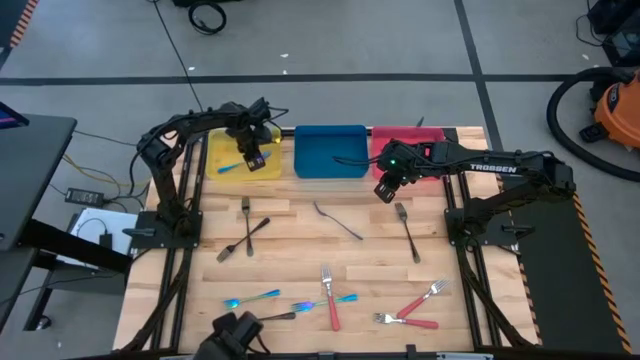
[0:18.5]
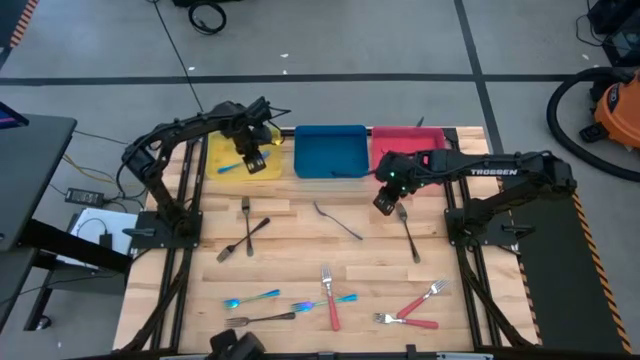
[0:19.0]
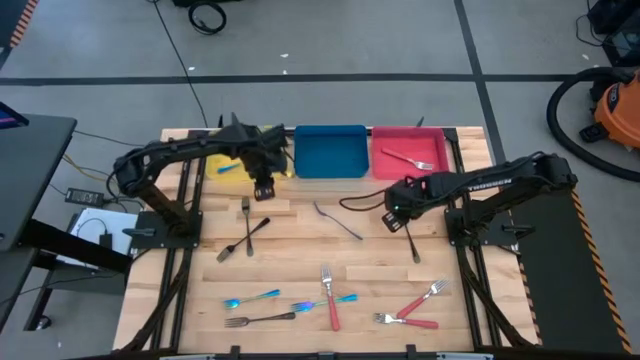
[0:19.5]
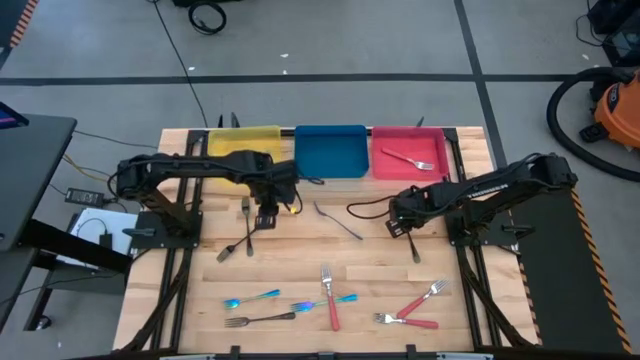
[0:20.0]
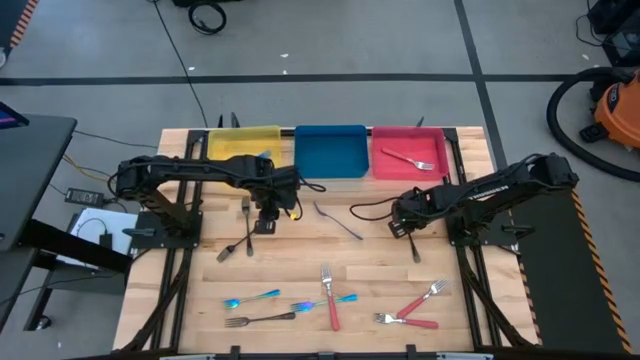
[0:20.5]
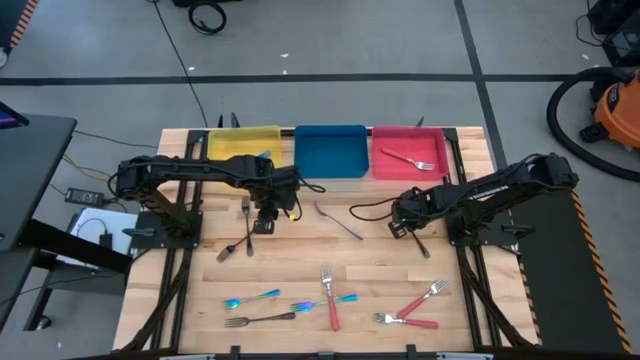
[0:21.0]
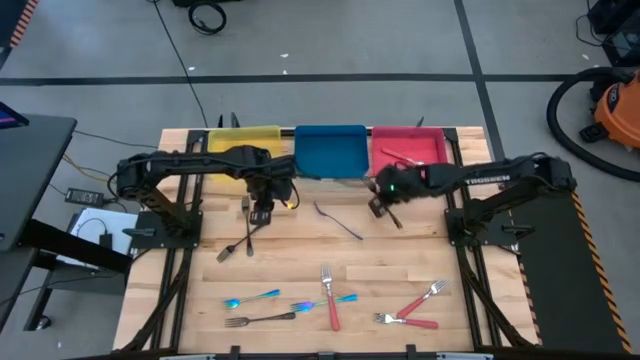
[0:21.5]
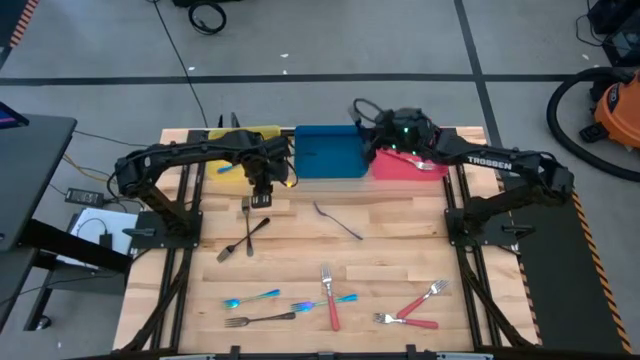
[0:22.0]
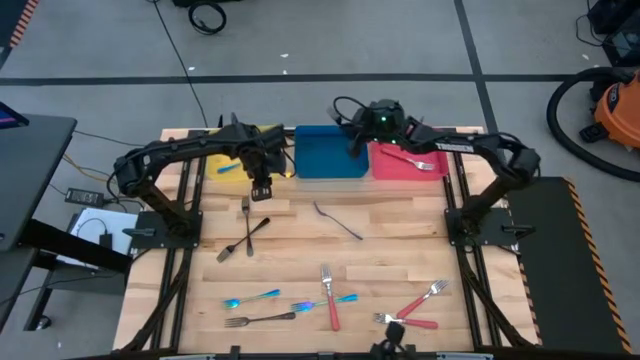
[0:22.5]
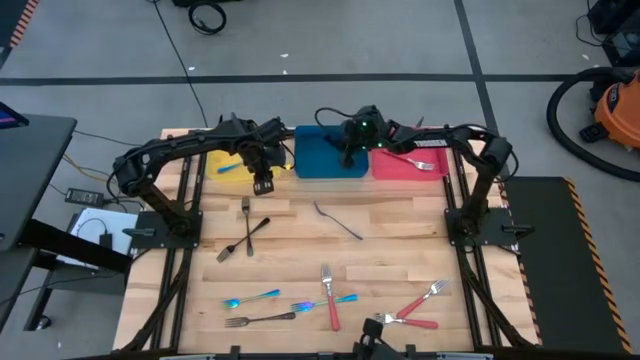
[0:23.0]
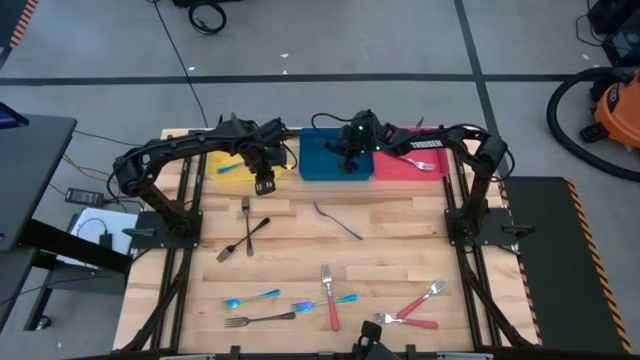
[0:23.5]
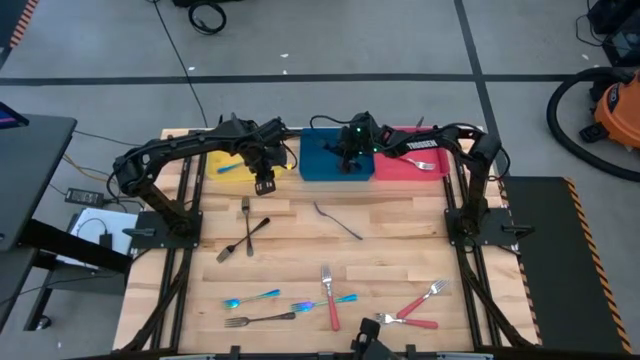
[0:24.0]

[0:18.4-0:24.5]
Task: Sort silverware by color (type)
Put the black fork into the blue bin

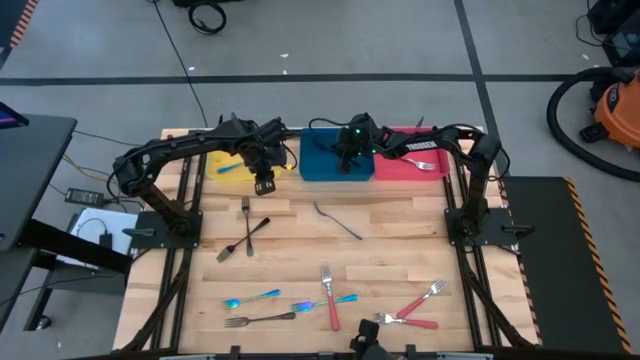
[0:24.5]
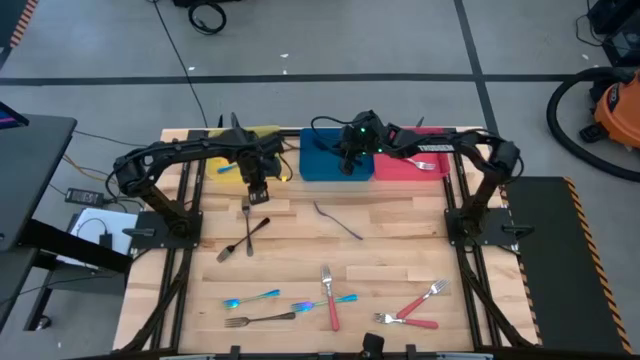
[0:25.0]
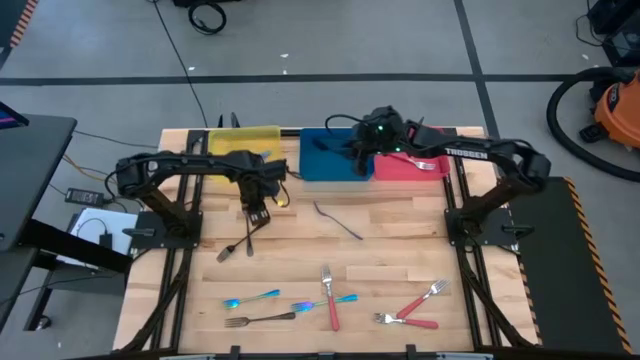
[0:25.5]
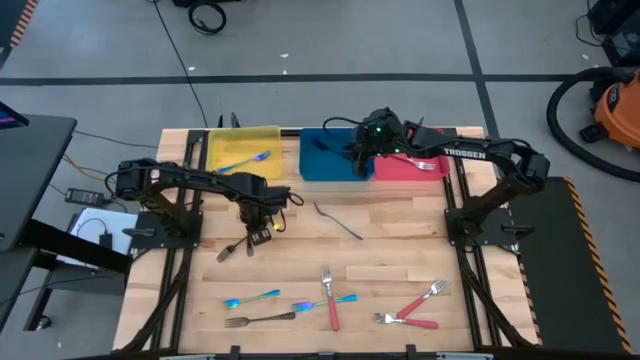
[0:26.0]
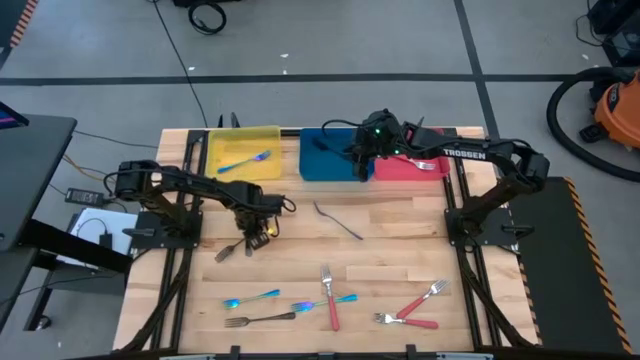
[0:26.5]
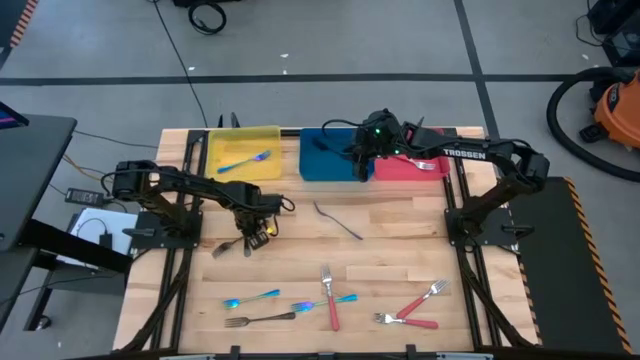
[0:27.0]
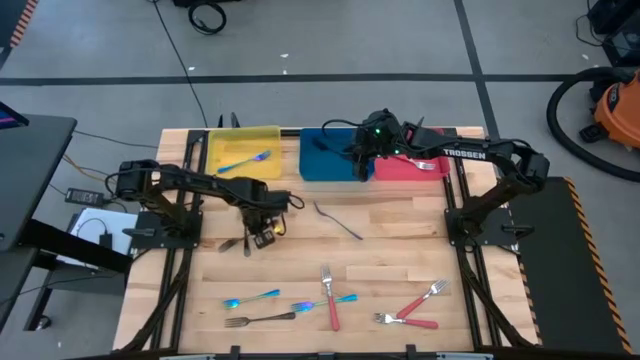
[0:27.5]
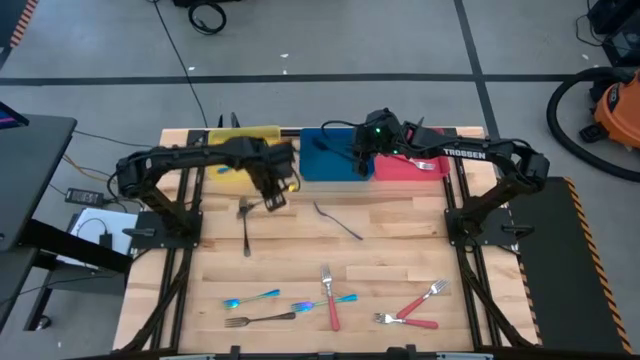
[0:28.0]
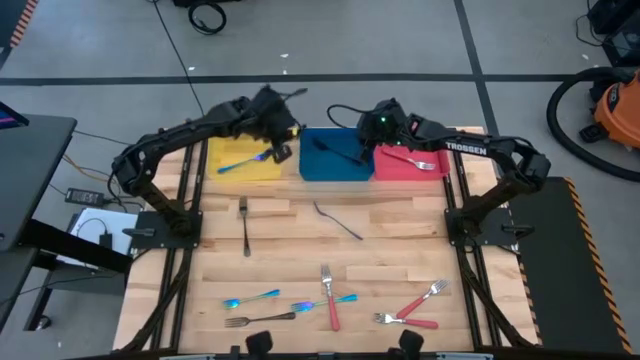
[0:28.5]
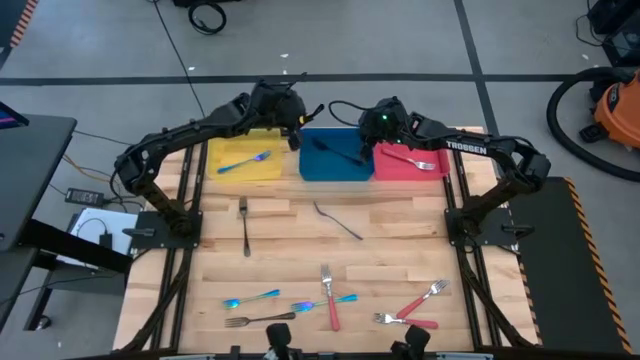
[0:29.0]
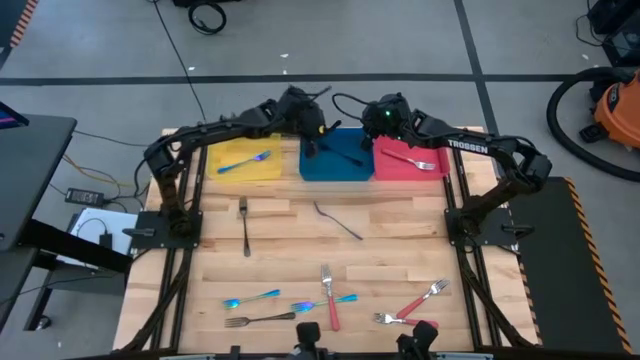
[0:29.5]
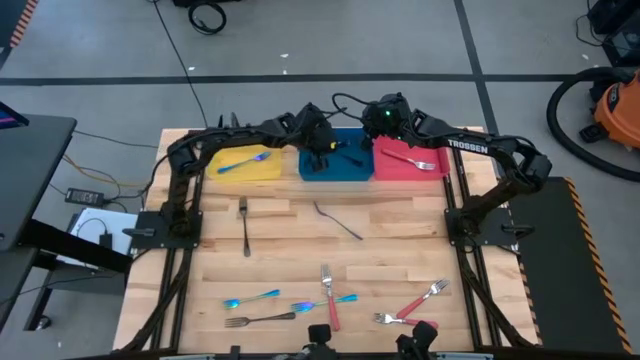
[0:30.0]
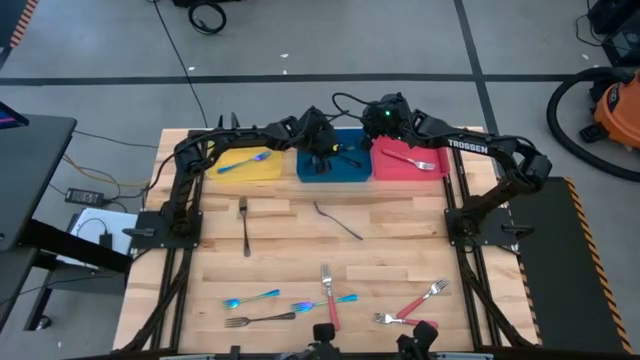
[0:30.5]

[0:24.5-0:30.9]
Put the black fork into the blue bin

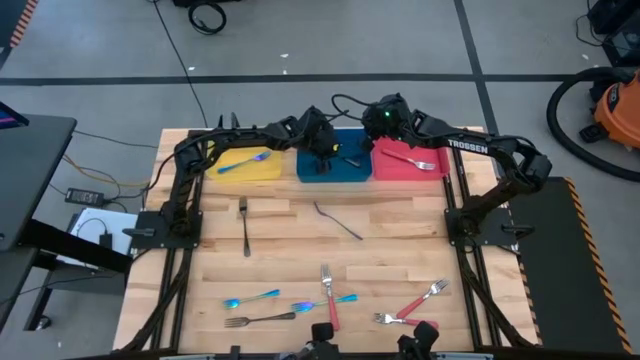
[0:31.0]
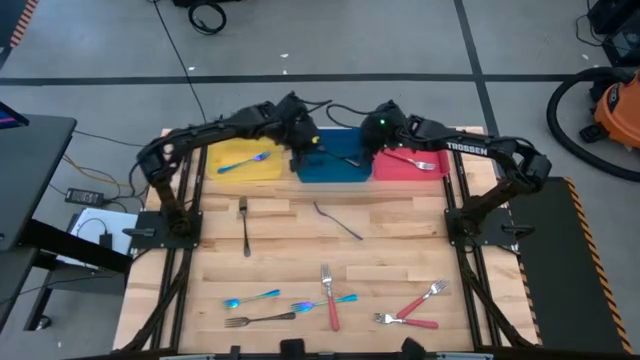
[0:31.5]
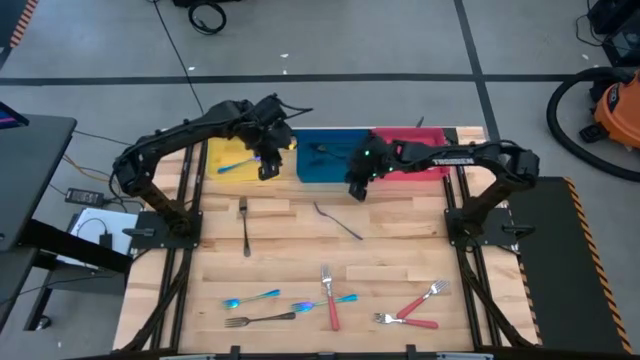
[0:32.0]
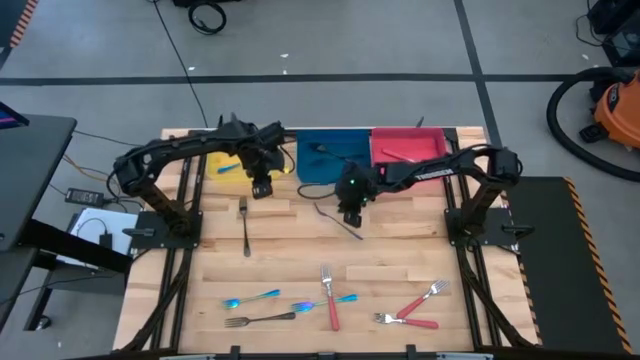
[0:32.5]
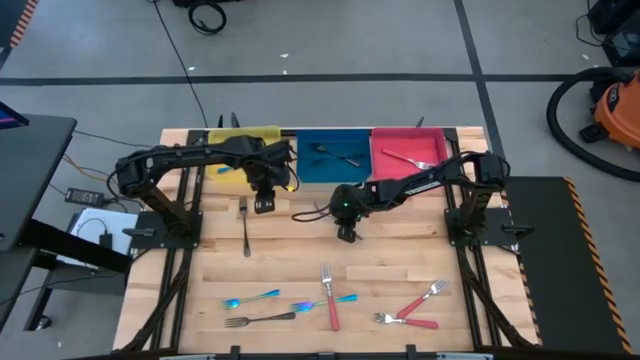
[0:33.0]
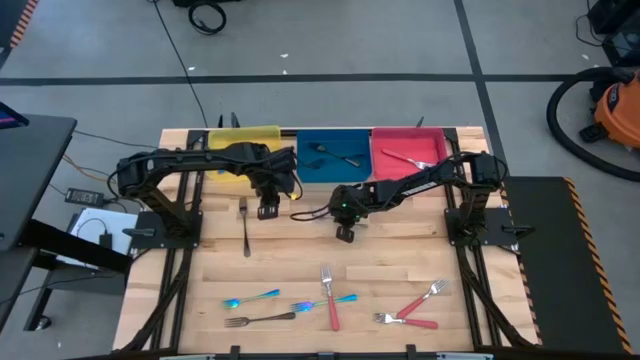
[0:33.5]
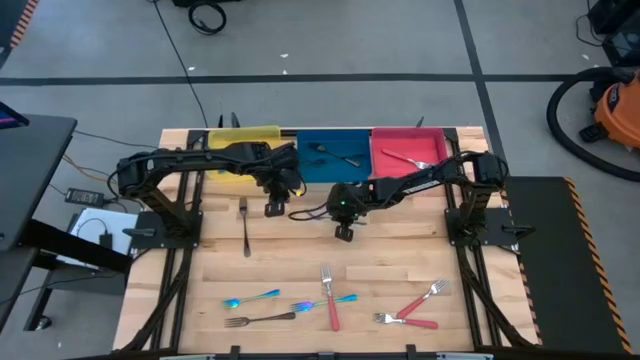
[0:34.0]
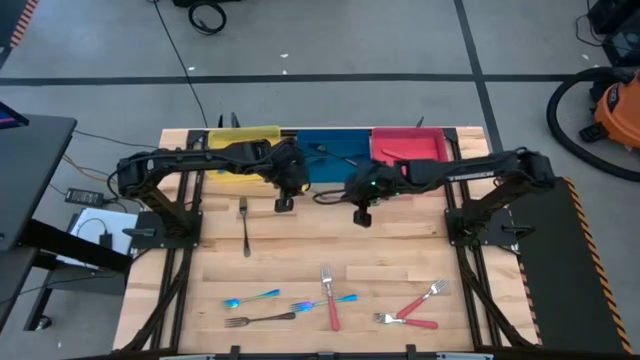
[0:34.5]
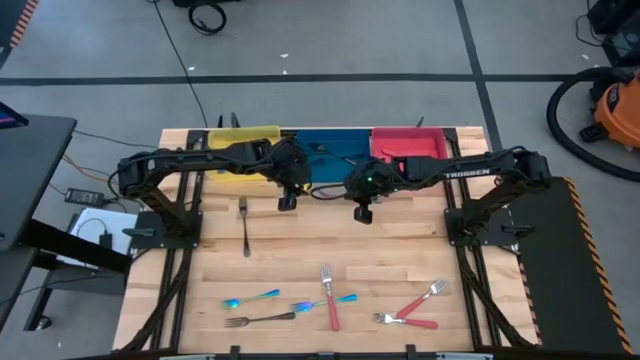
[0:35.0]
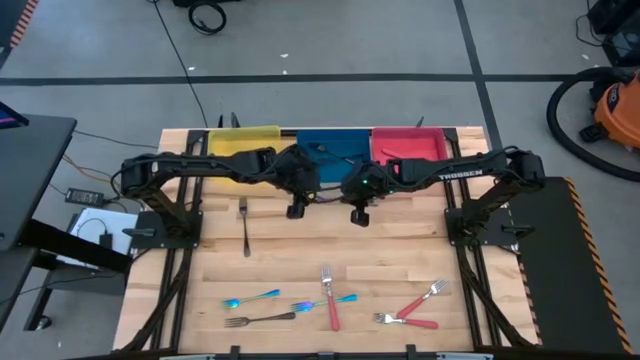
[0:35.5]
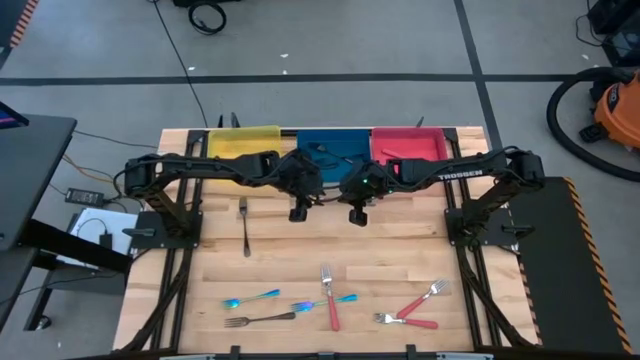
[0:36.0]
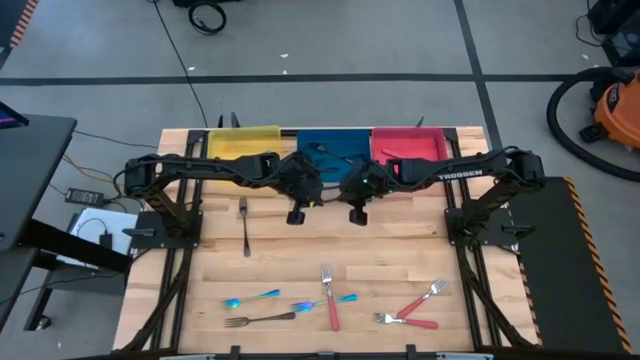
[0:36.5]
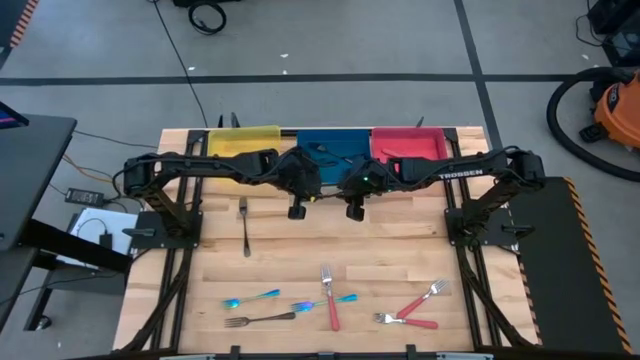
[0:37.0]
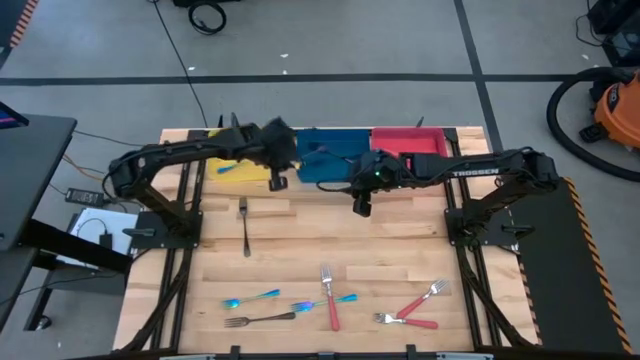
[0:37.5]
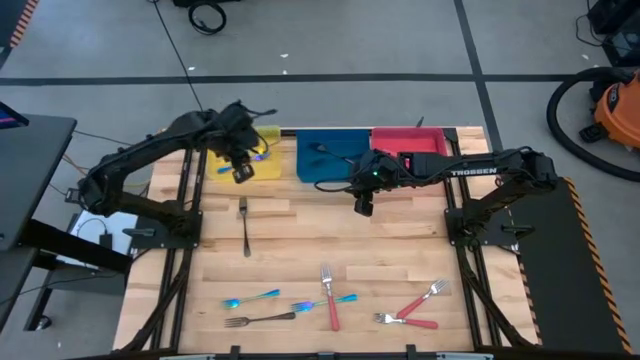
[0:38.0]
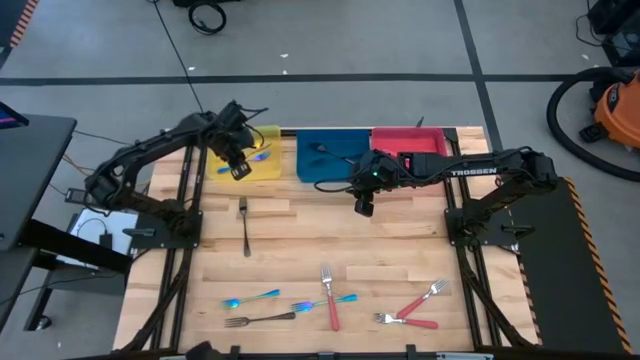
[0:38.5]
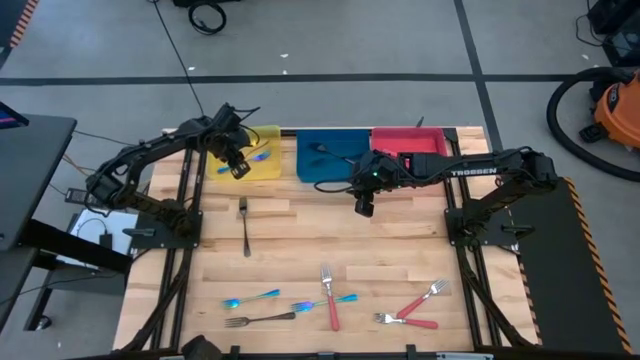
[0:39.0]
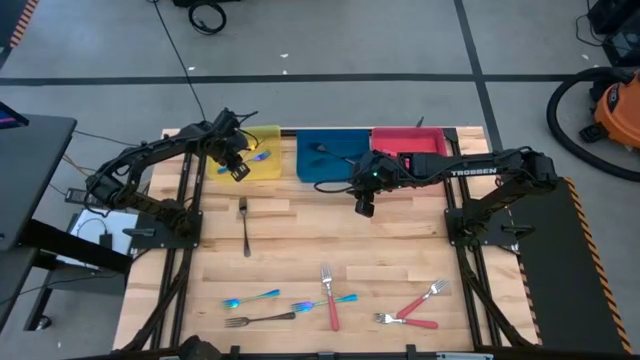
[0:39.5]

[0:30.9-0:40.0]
Put the blue fork into the yellow bin
